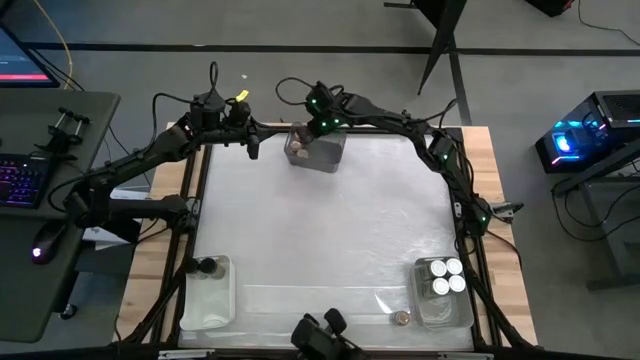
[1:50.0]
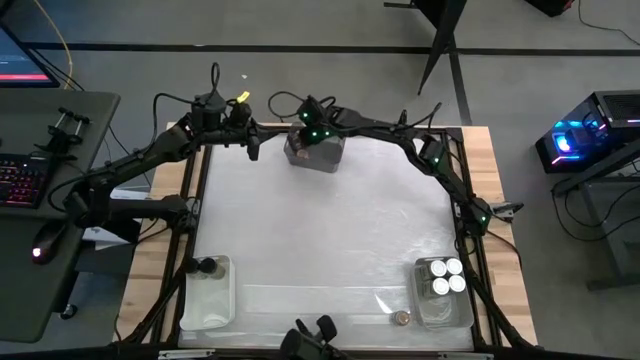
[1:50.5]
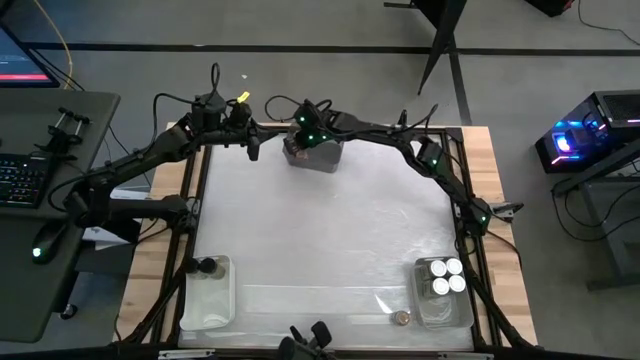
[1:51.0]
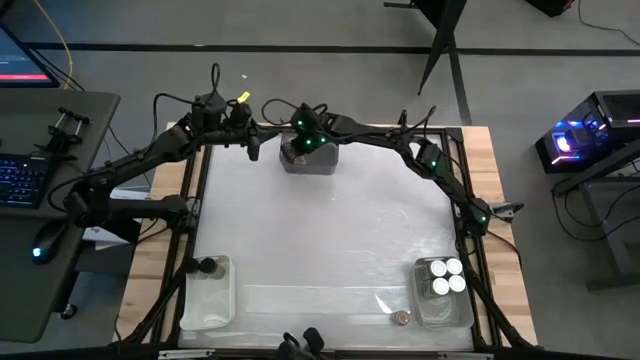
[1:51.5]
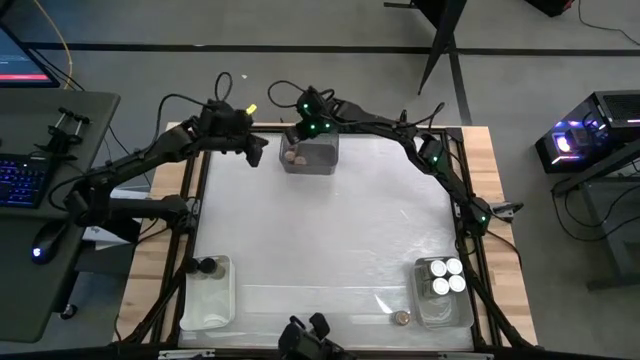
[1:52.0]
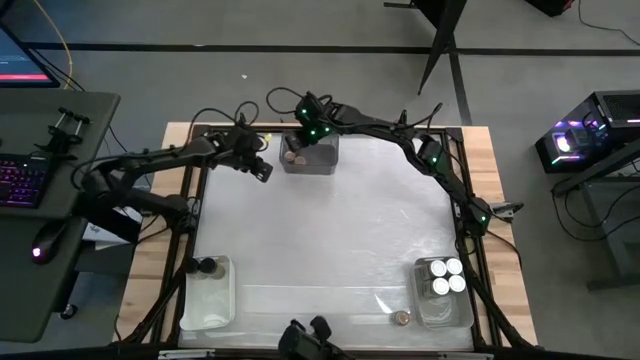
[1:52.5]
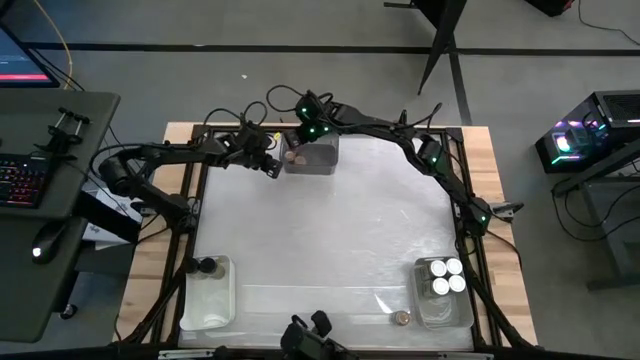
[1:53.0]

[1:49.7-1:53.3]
Task: Sort spices by type
Adjust the brown seasoning bottles in the black bin

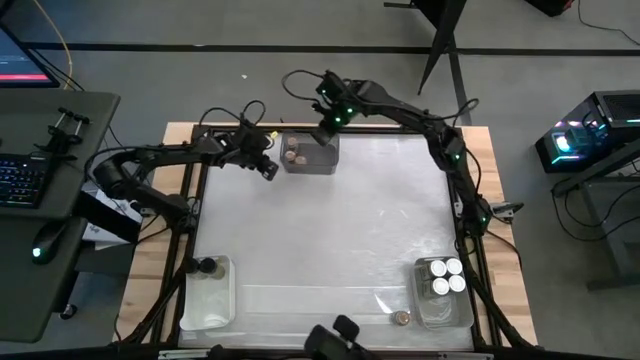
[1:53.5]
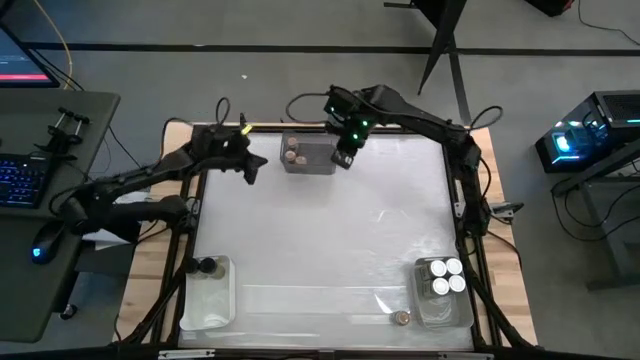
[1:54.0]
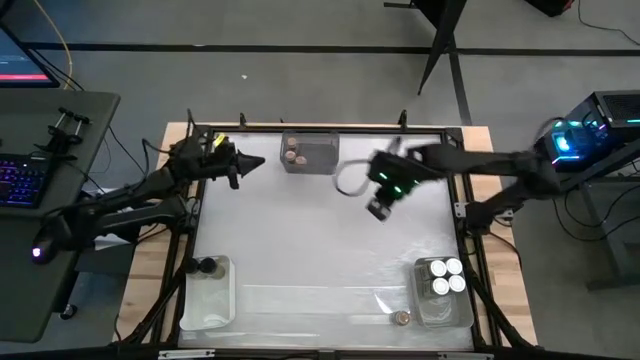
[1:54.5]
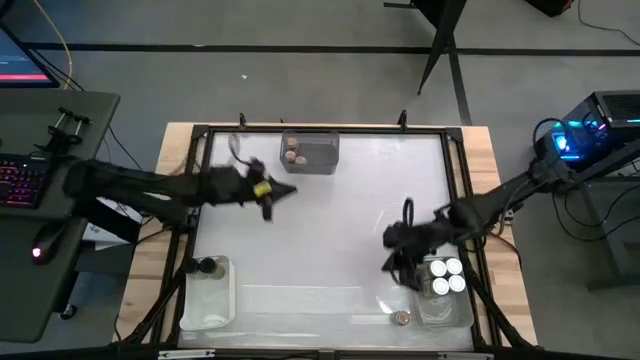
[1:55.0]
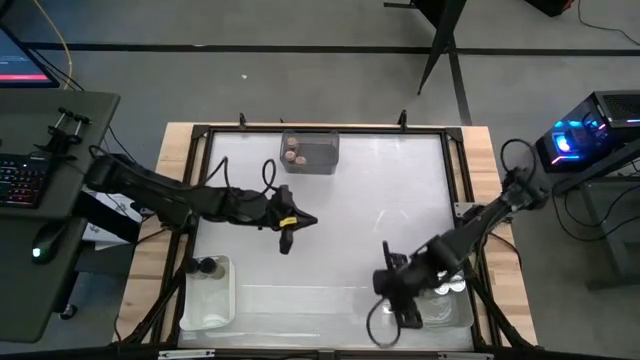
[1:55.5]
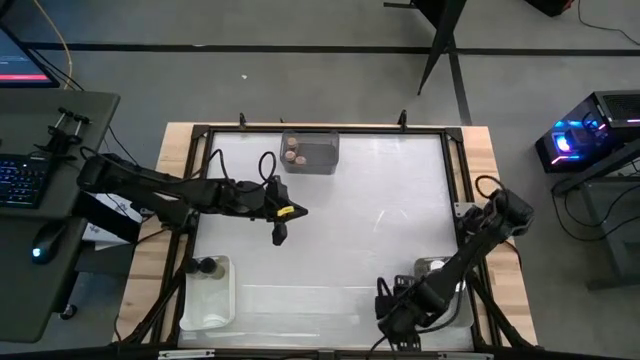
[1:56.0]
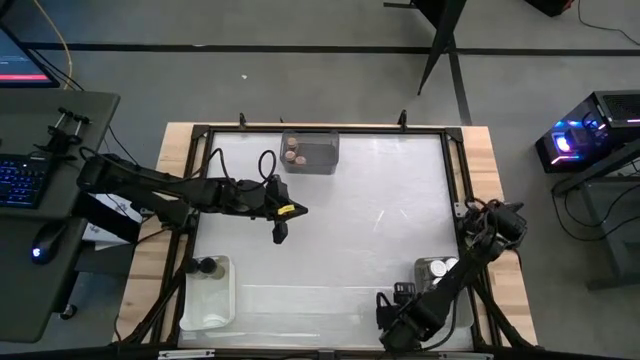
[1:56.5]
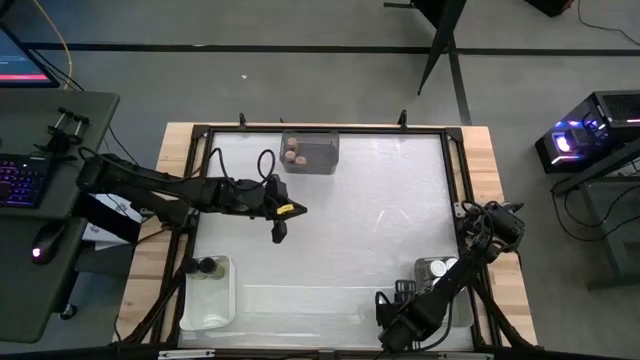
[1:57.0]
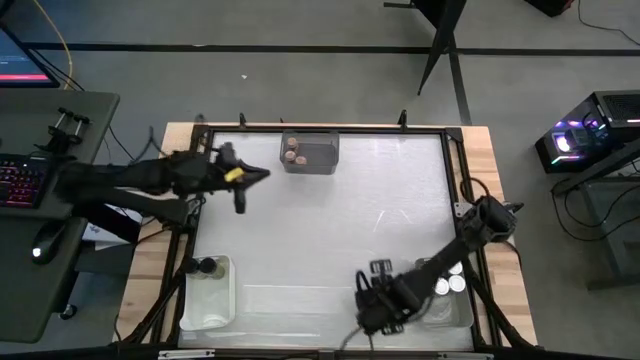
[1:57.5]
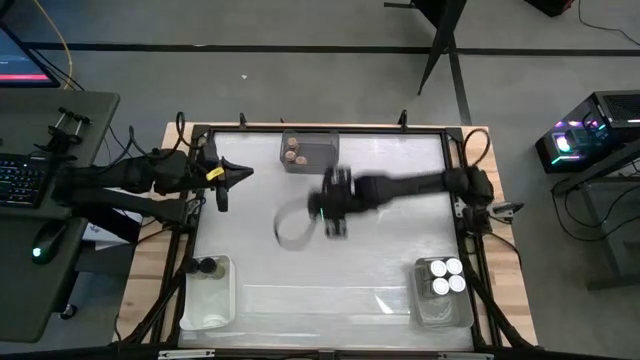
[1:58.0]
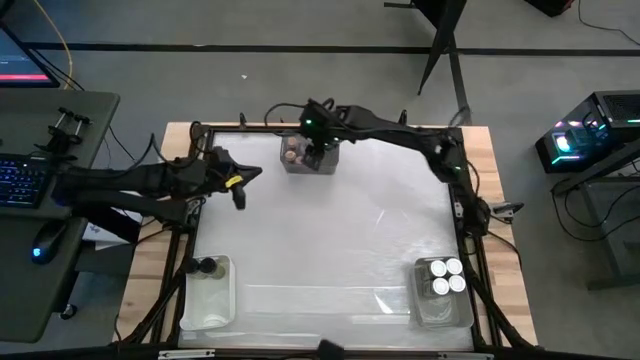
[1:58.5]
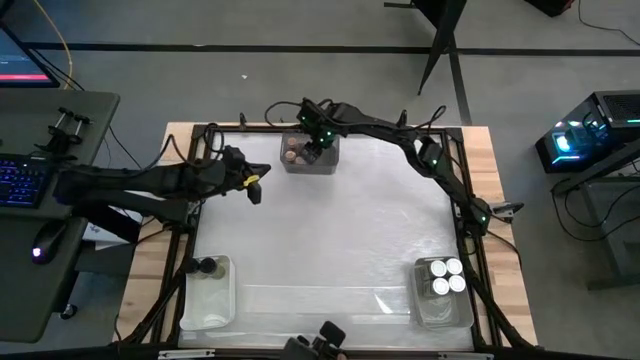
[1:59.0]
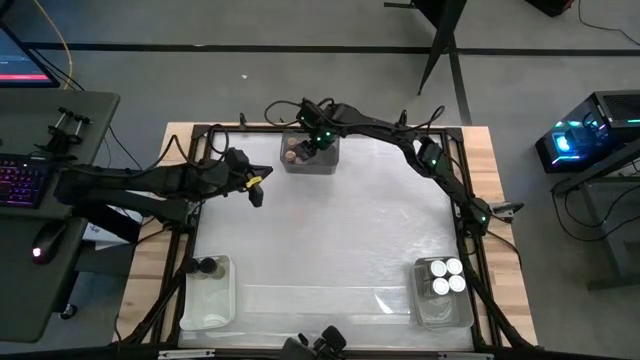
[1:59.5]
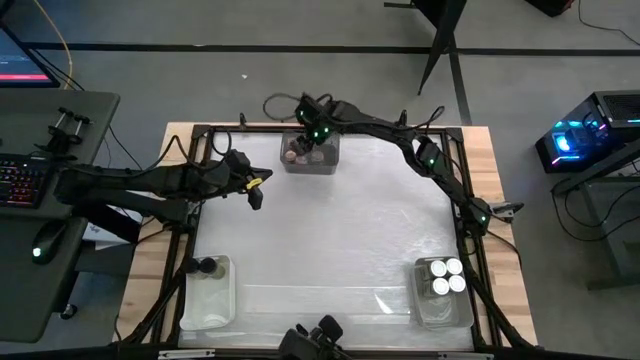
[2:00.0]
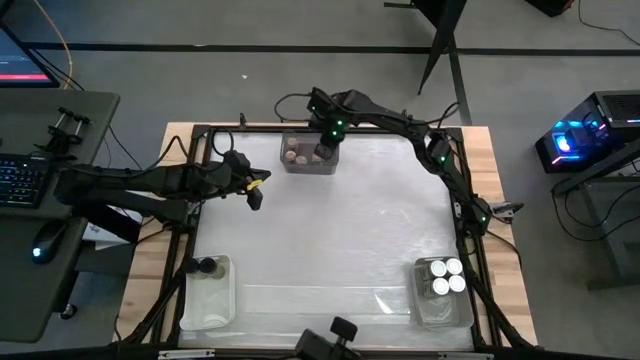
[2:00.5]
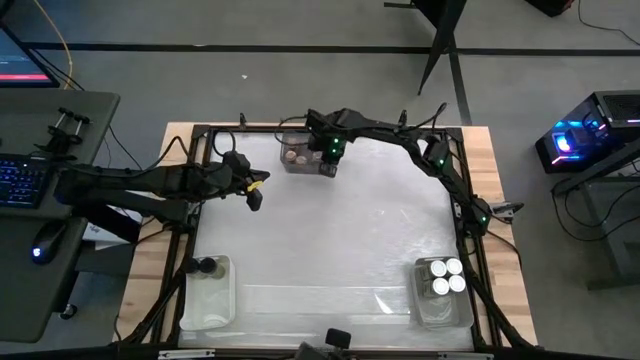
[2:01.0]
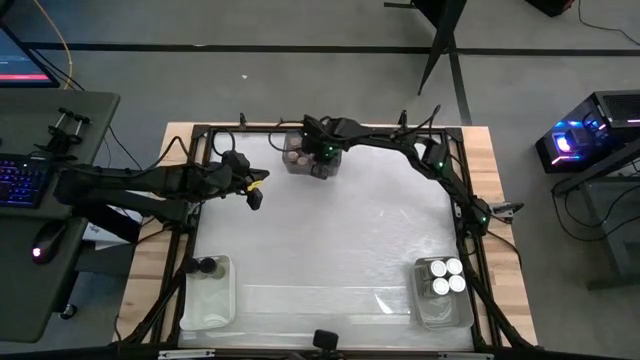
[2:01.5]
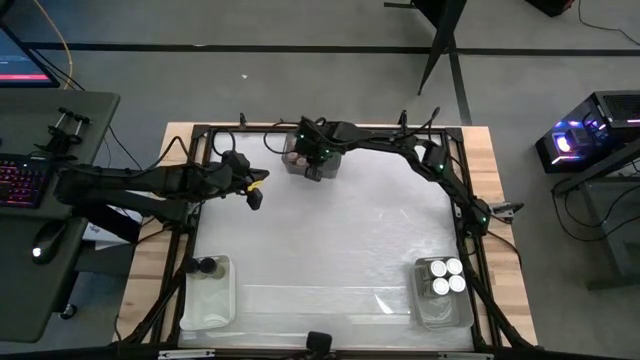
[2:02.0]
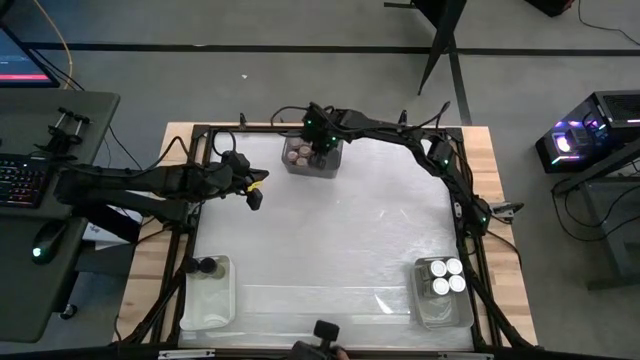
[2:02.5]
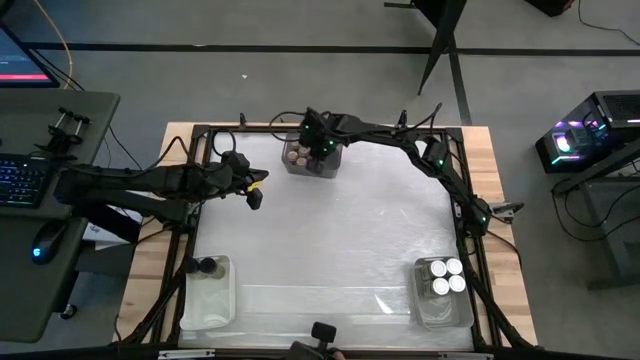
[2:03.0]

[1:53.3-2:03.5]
Put the brown seasoning bottle into the black bin

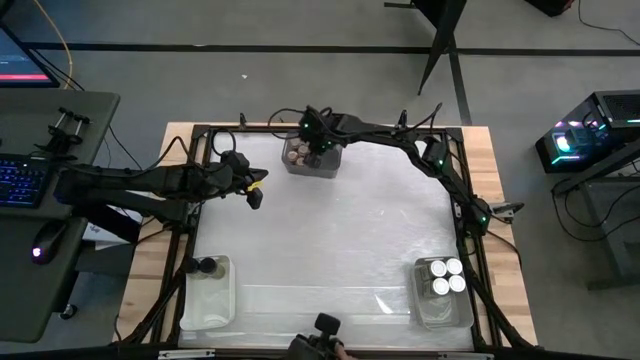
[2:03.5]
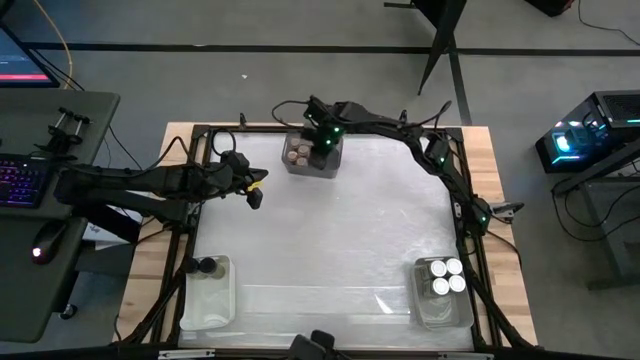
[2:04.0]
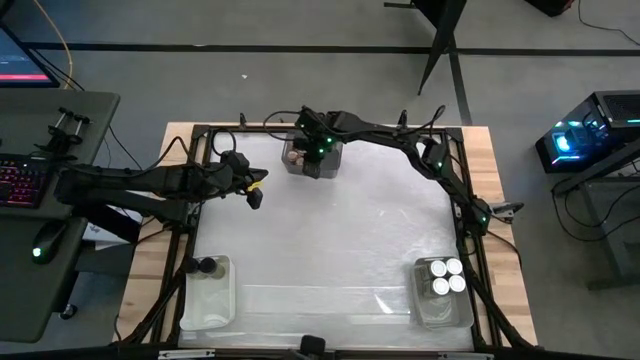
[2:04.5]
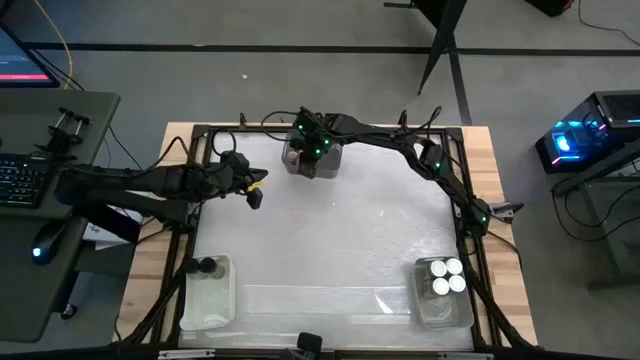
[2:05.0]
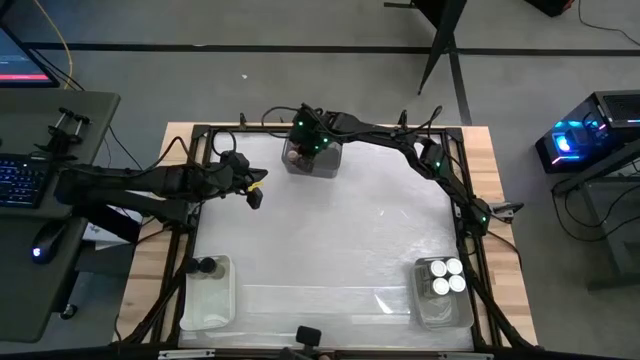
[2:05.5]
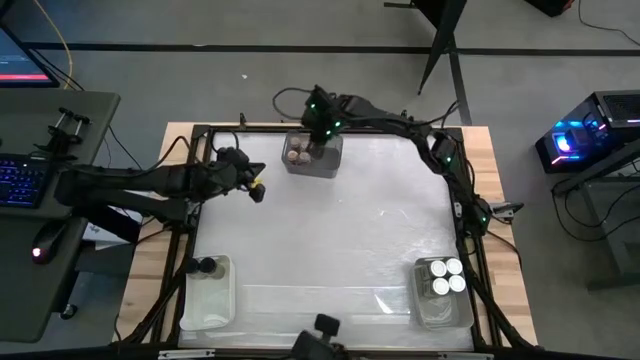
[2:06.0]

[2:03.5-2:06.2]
Adjust the brown seasoning bottles in the black bin
